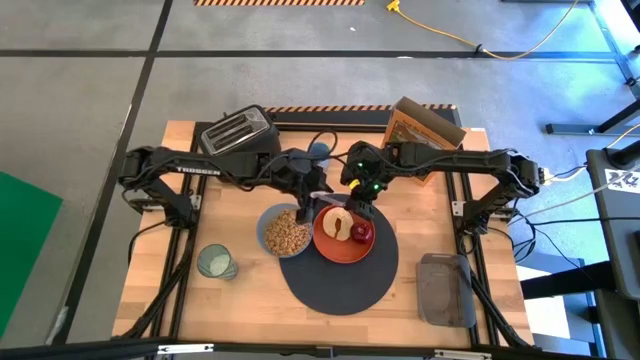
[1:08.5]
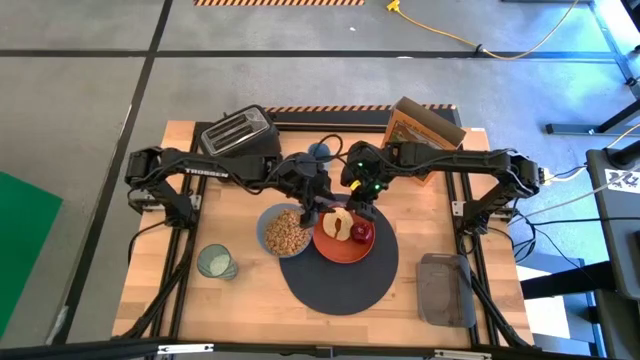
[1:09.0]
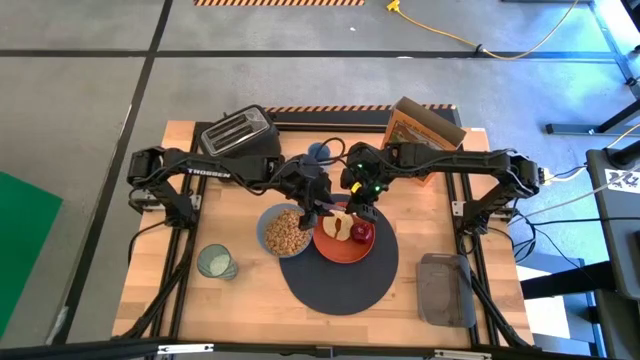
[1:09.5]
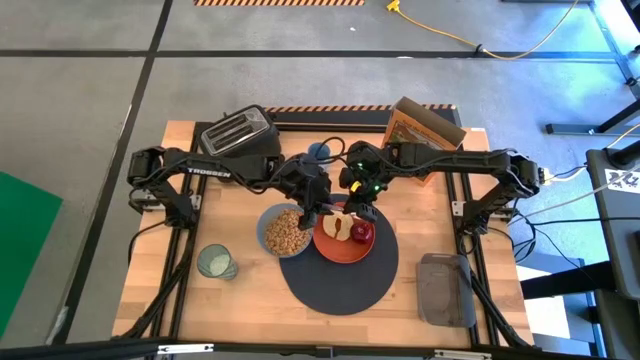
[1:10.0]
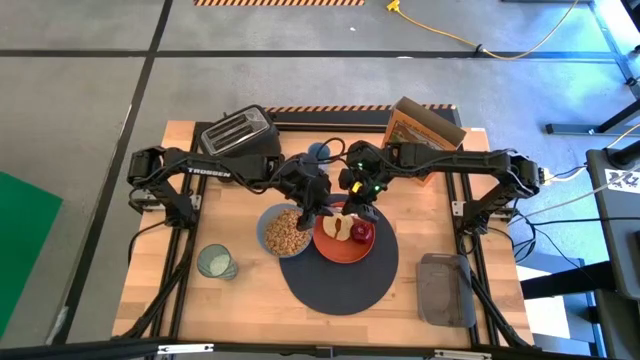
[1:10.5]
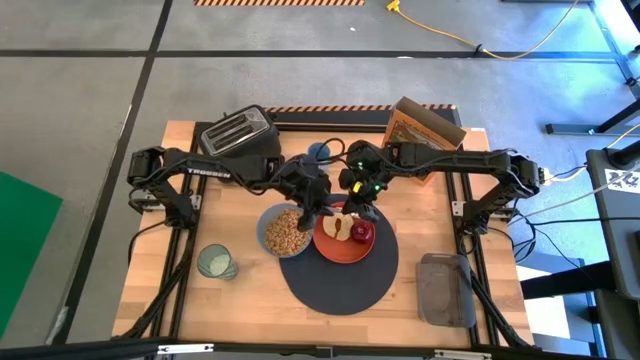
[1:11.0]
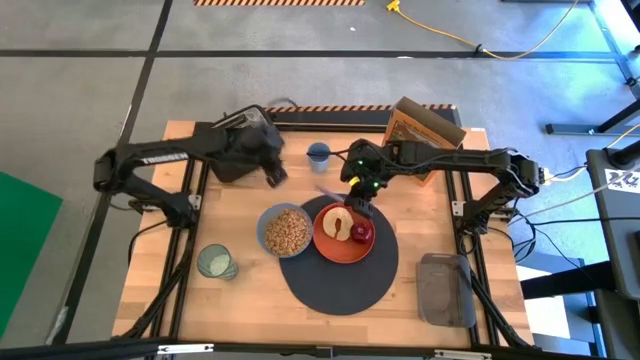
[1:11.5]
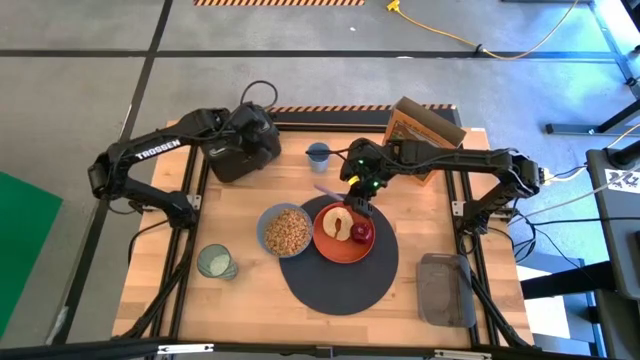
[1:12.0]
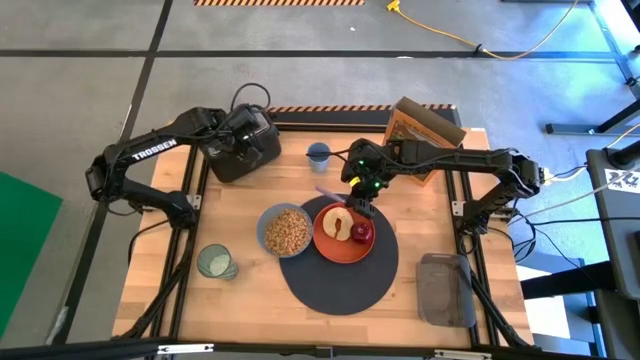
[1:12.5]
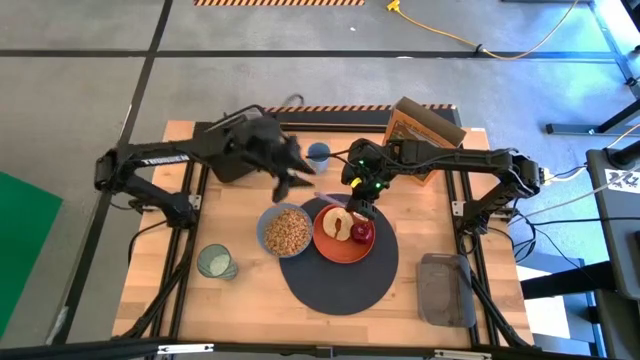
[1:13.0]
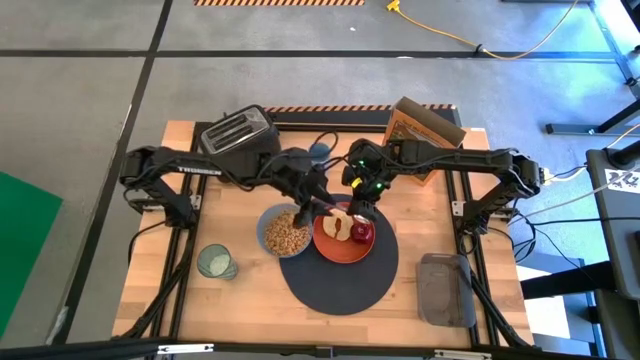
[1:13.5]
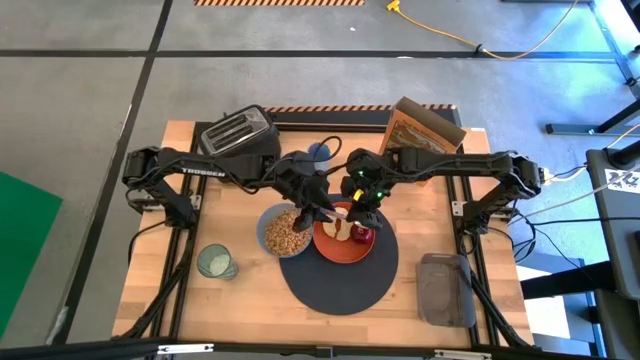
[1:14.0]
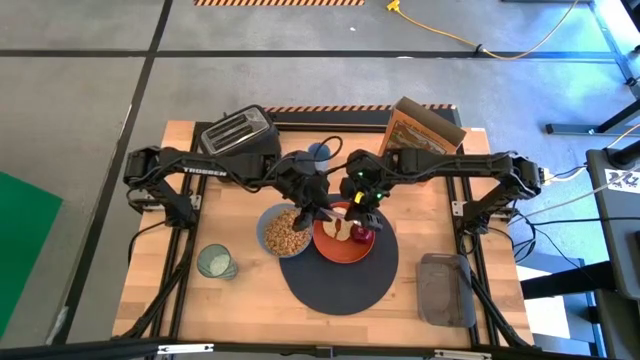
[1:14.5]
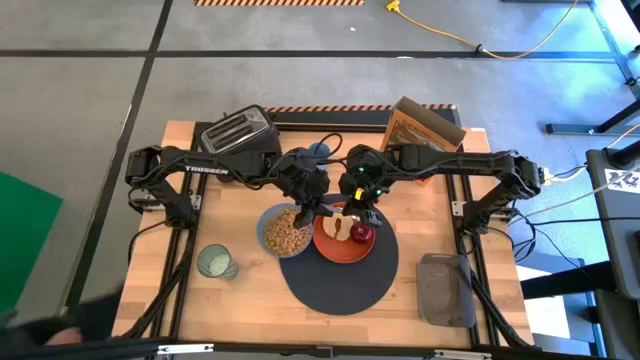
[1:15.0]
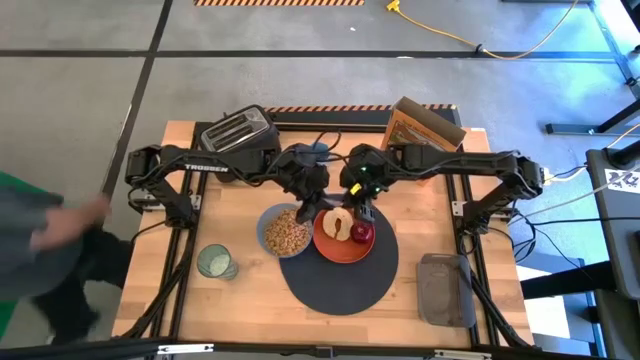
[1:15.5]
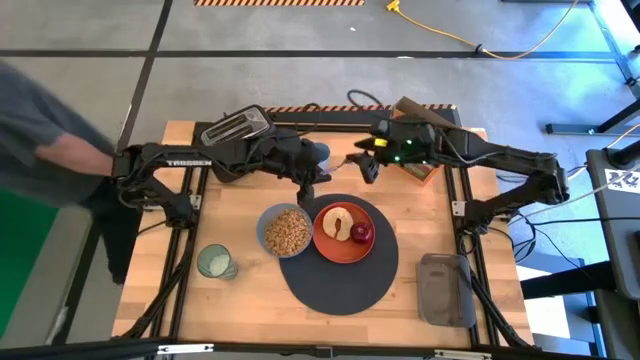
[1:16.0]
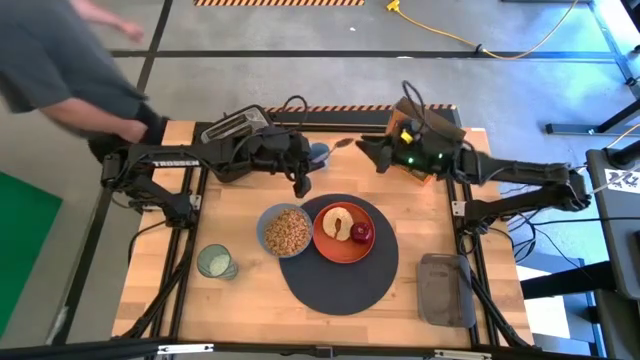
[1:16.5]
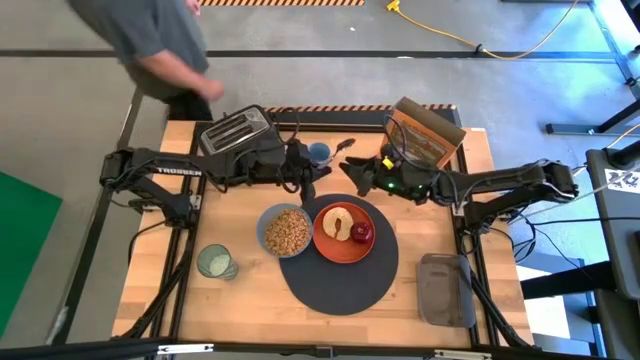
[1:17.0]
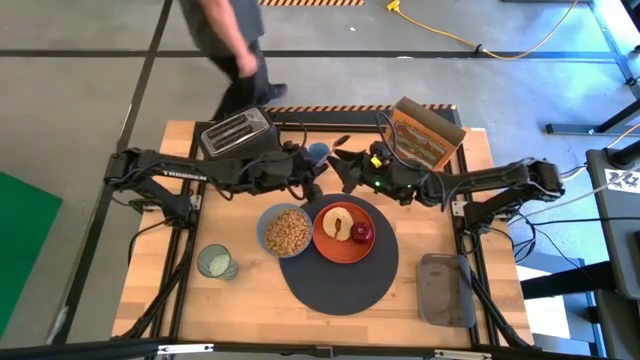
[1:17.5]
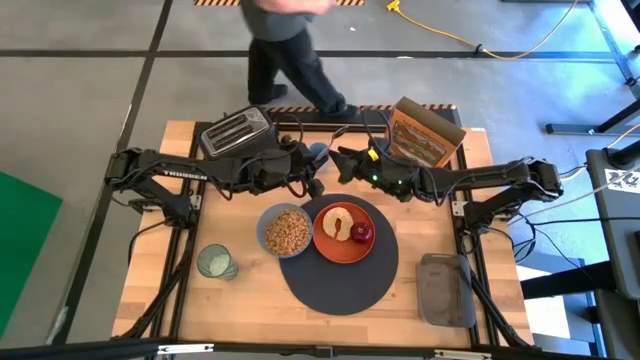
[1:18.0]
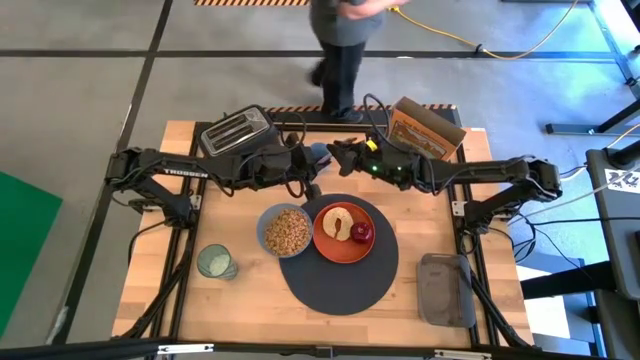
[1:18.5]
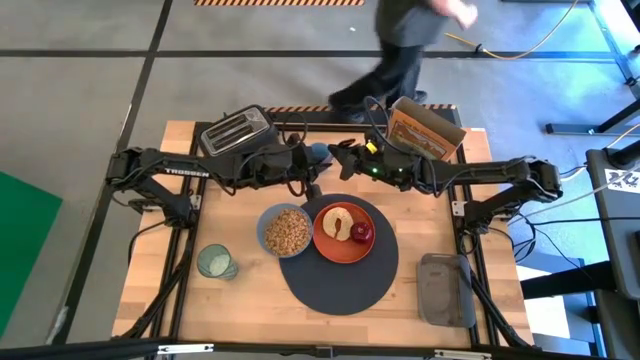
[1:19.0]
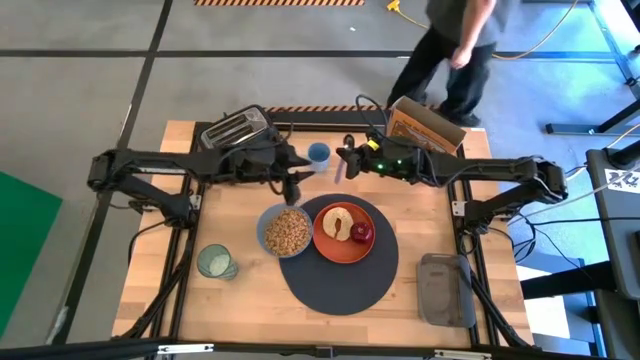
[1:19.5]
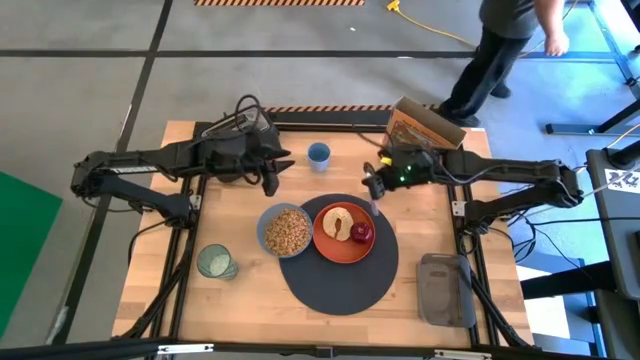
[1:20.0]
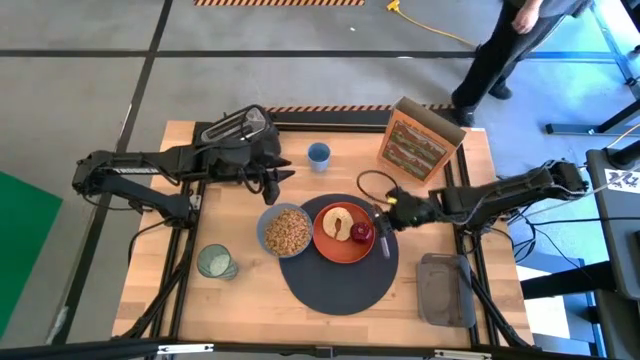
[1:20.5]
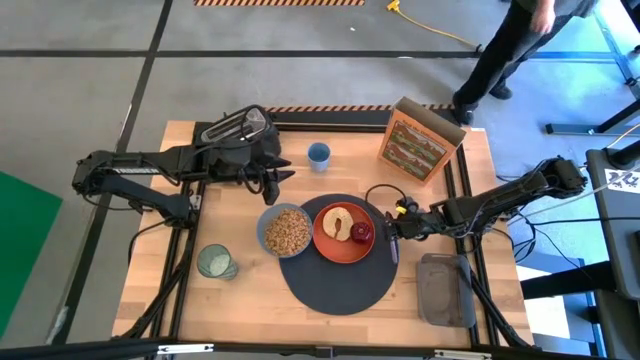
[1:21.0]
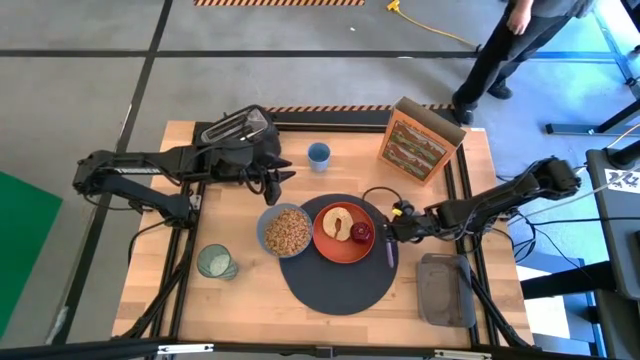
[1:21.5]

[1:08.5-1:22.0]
Task: Arrange a breakfast setting
Put the blue spoon on the tablemat to the right of the orange plate

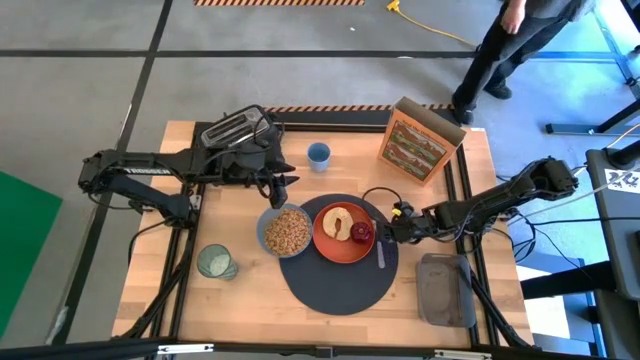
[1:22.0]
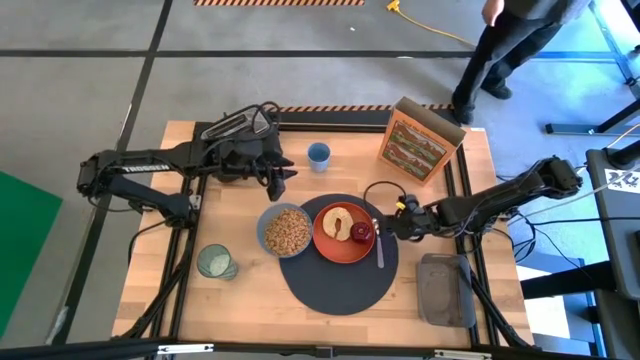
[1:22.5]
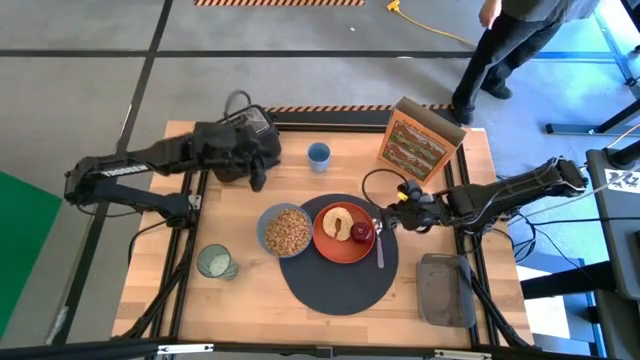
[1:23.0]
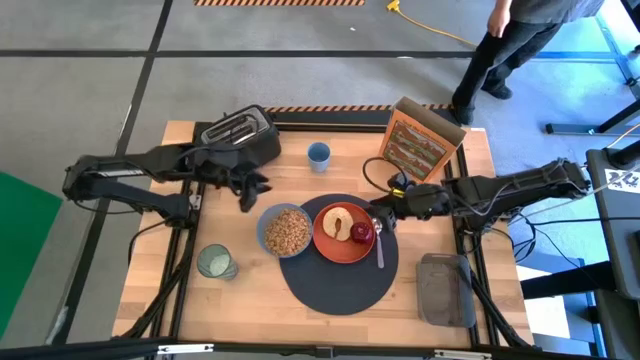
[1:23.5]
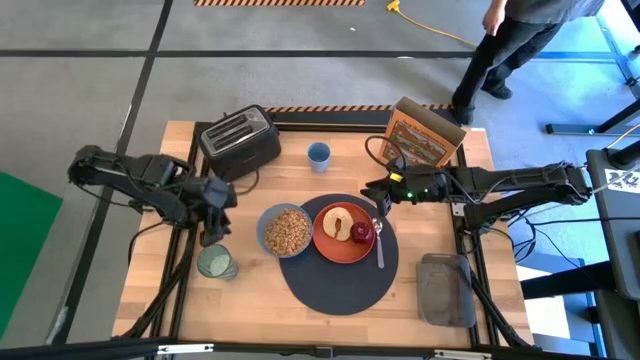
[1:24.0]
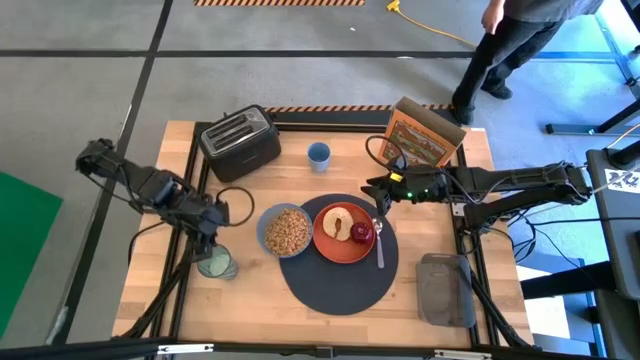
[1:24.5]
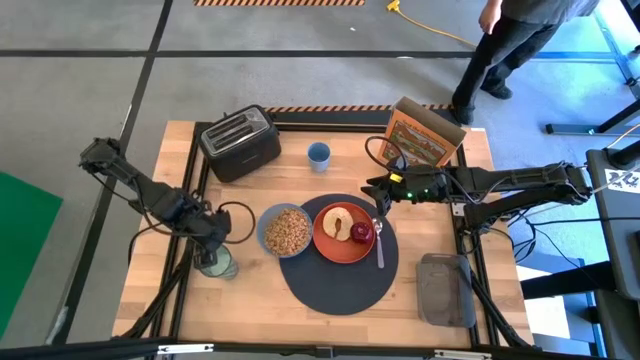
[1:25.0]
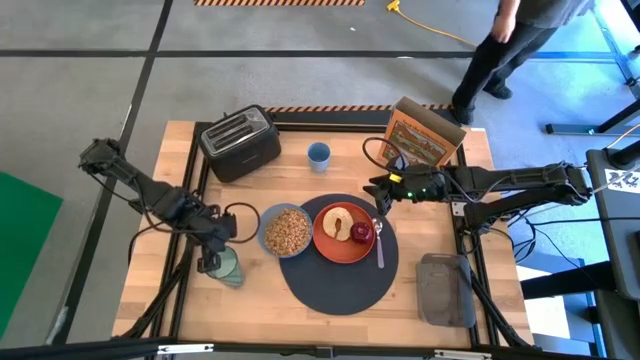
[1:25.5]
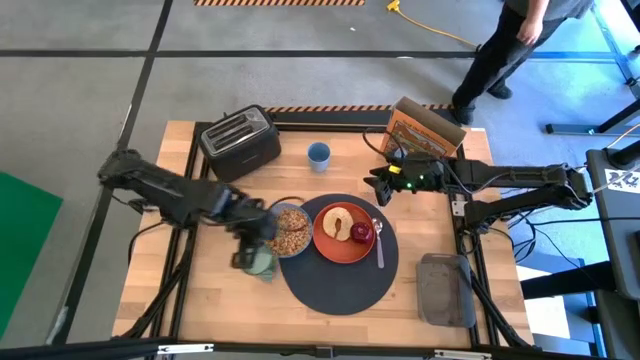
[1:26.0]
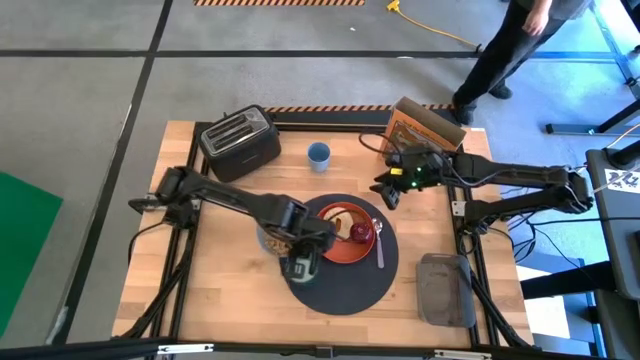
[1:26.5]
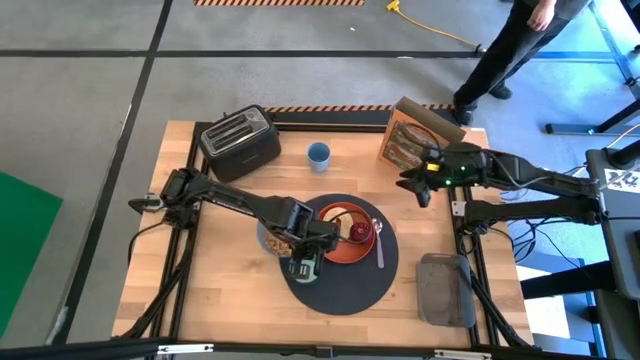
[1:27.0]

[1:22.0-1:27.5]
Put the blue cup with rice on the bottom right of the tablemat

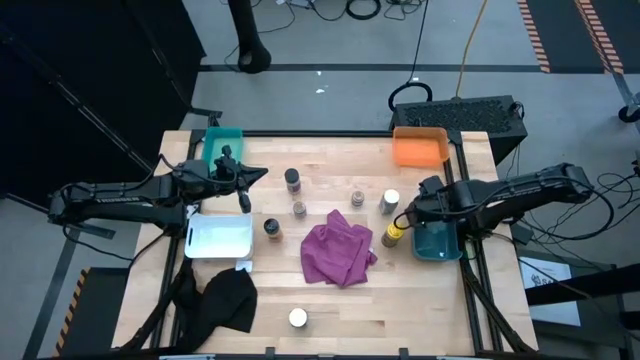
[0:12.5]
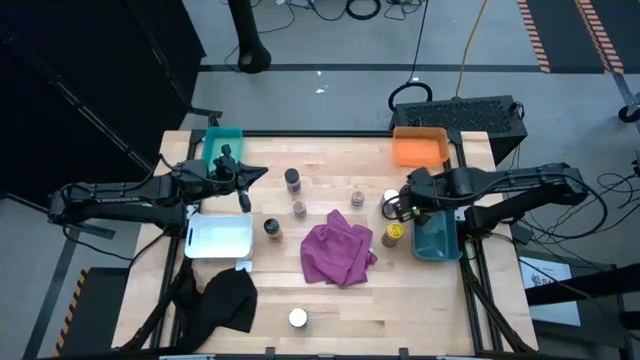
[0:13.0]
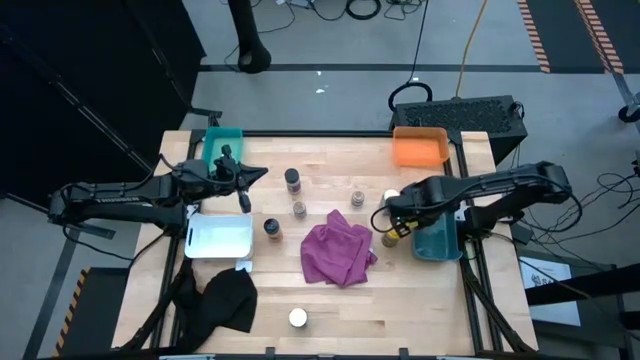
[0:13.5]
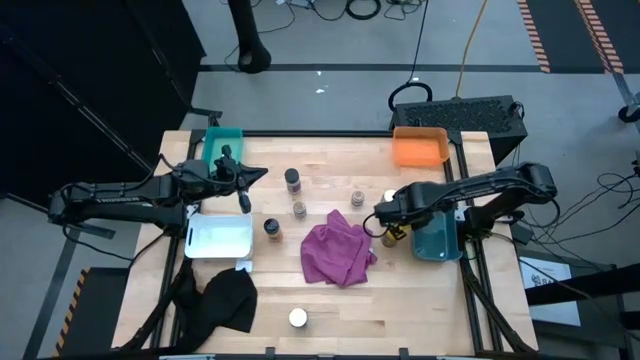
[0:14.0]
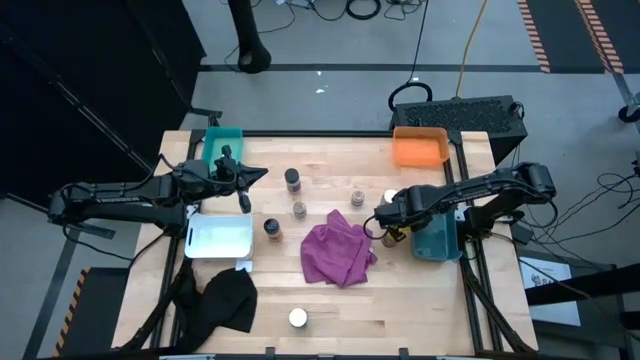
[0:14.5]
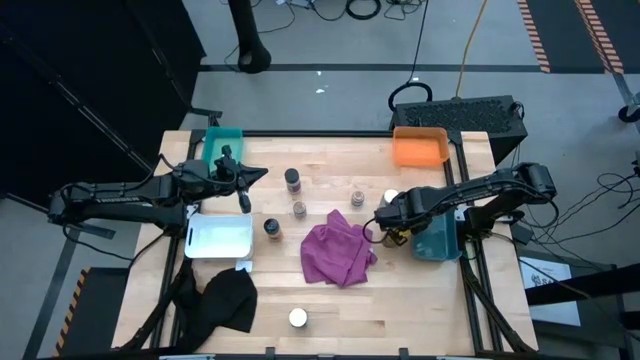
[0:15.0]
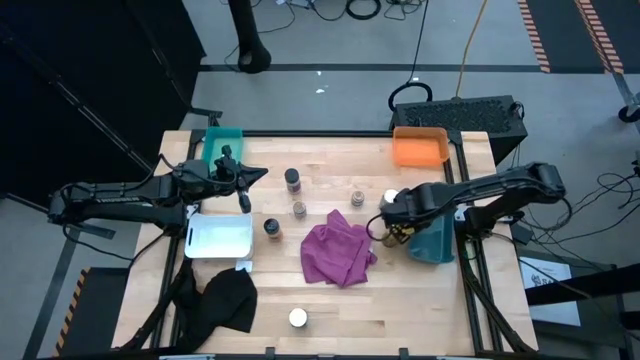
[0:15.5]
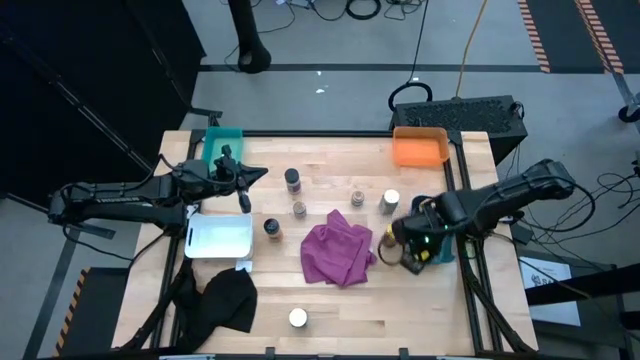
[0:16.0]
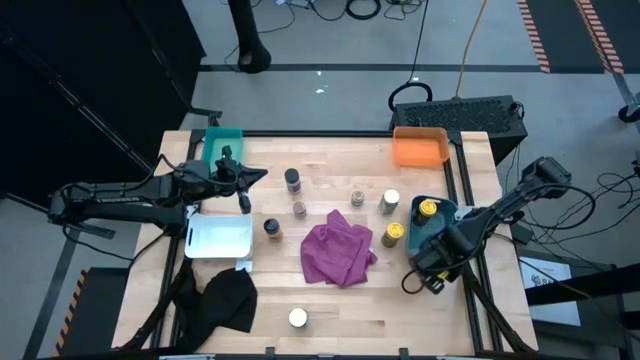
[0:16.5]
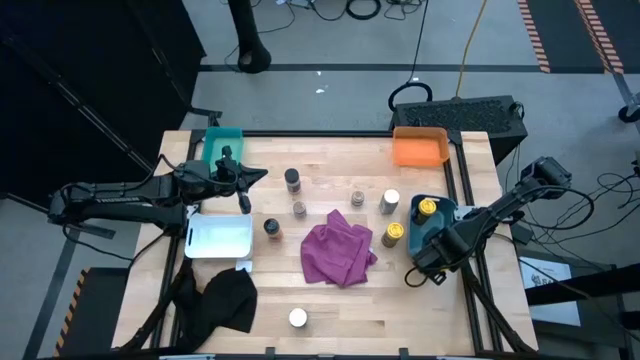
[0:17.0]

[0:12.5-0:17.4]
Task: Sort spices by type
Adjust the blue bin
